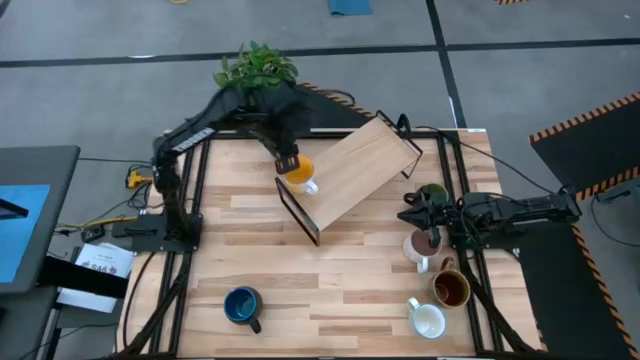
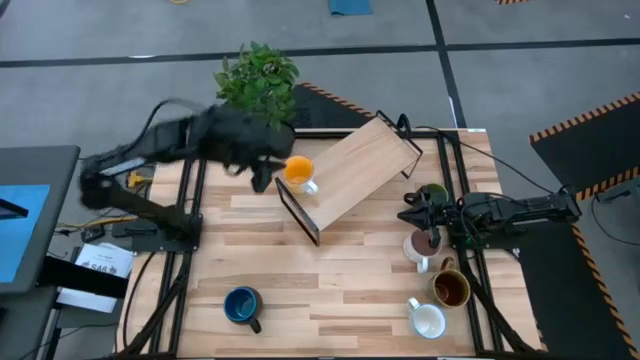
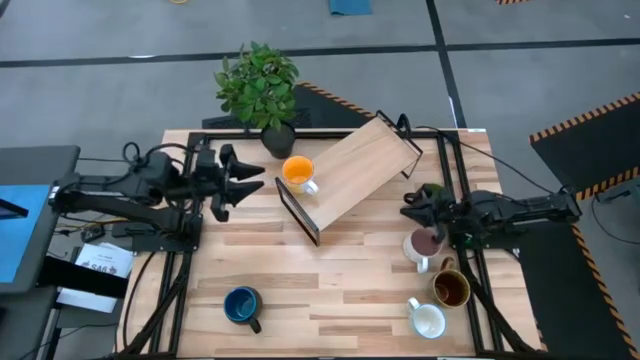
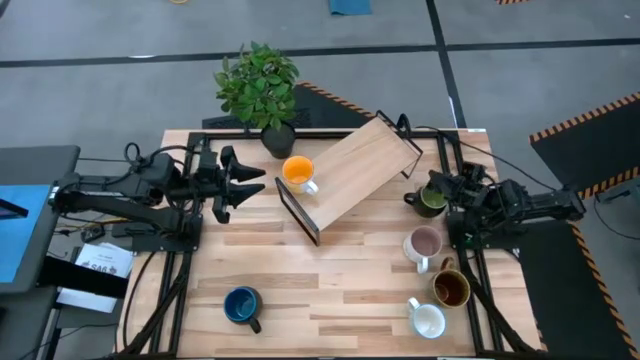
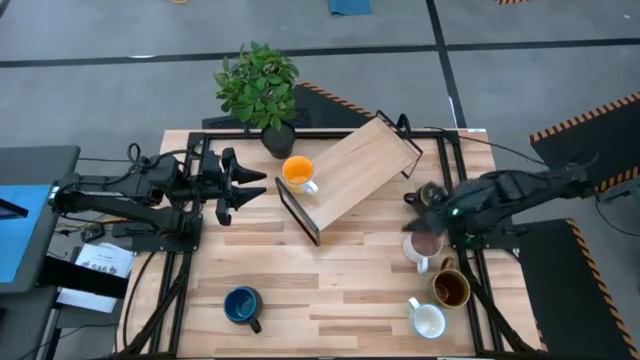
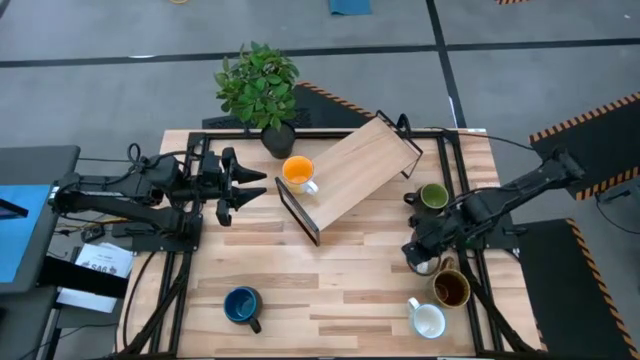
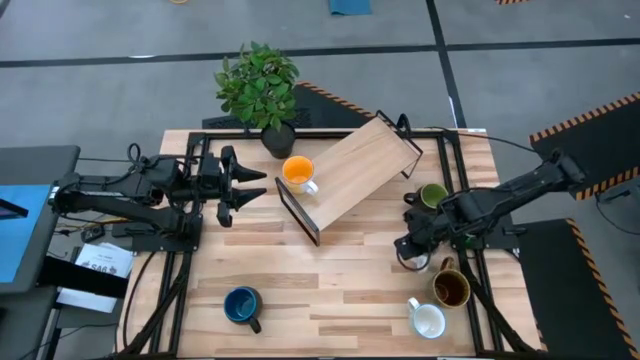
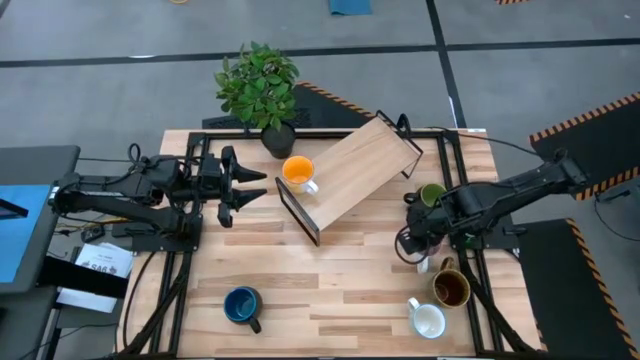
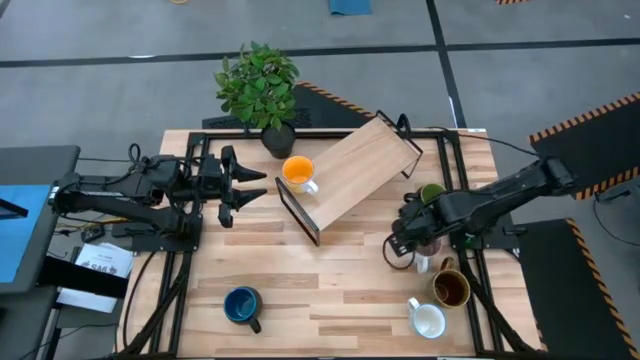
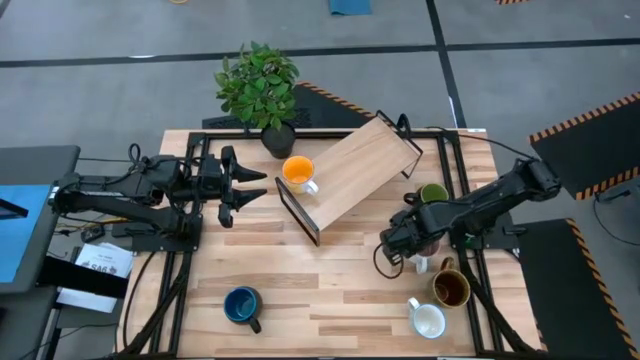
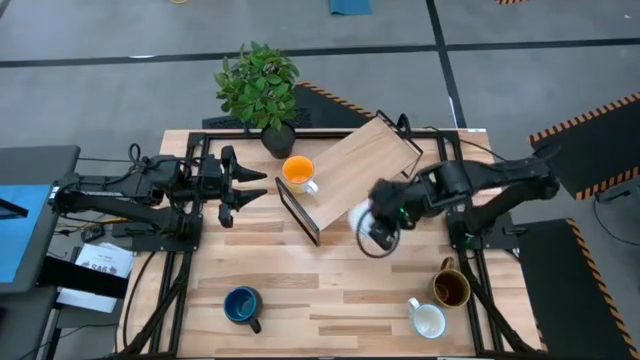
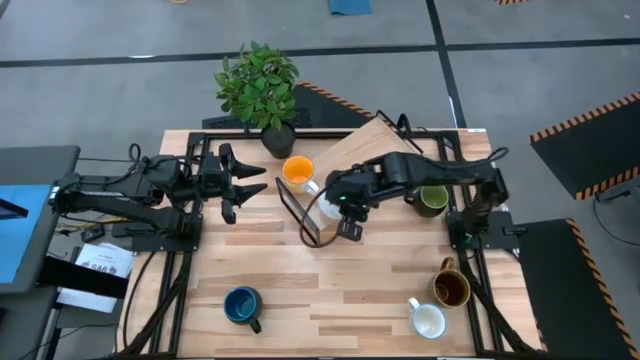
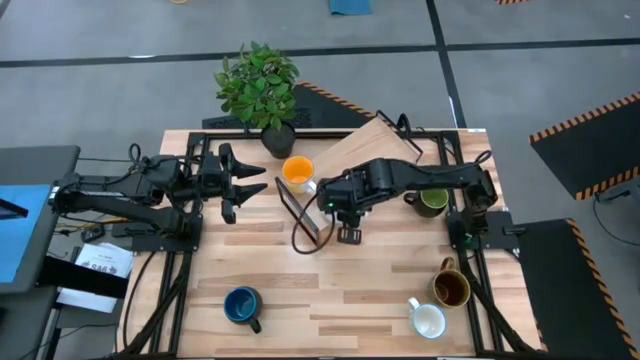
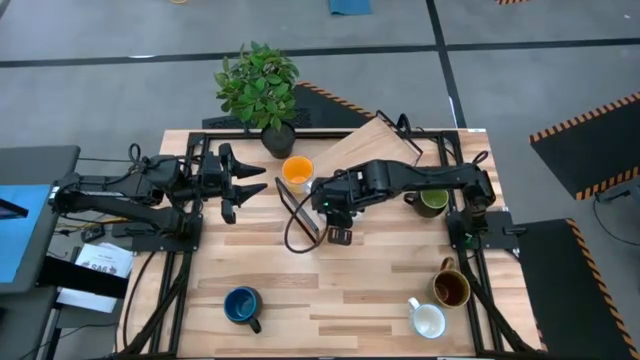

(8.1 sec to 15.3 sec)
Task: Place coffee mugs
Put the pink mug on the shelf

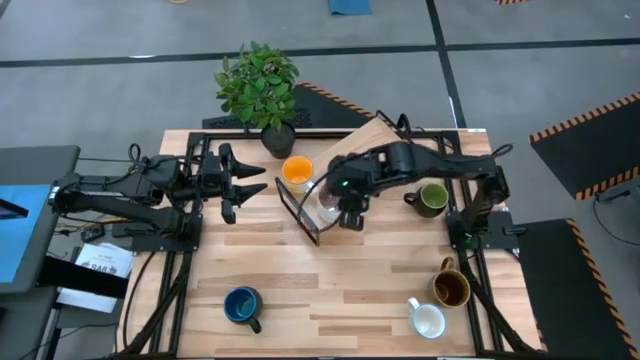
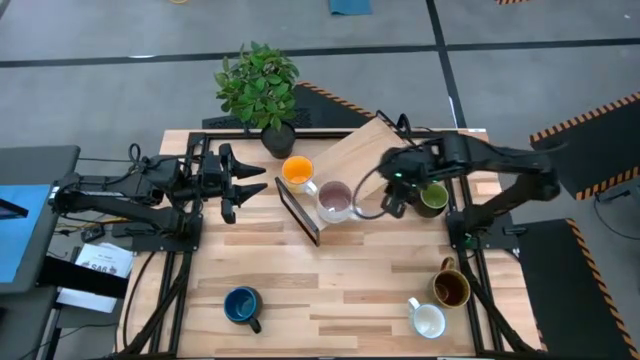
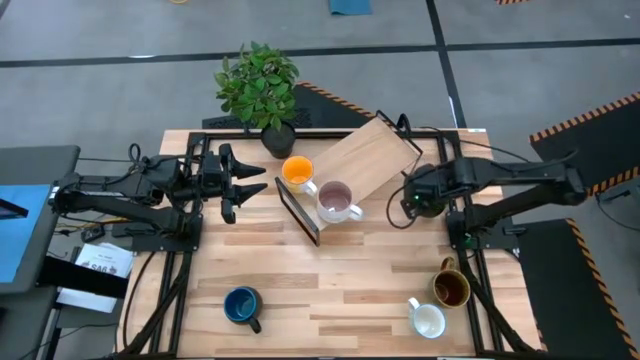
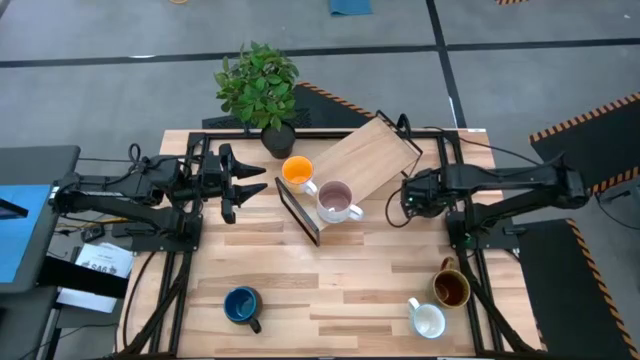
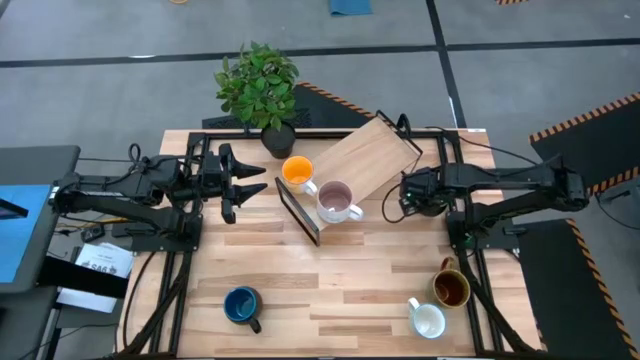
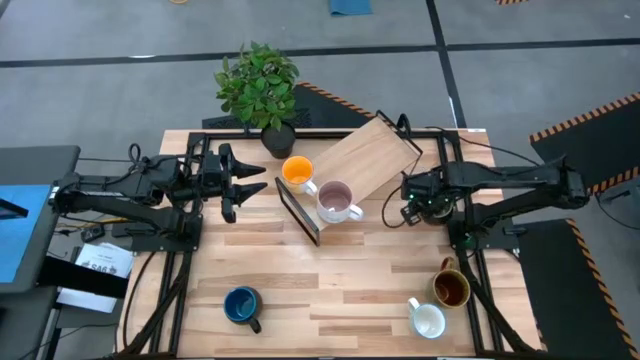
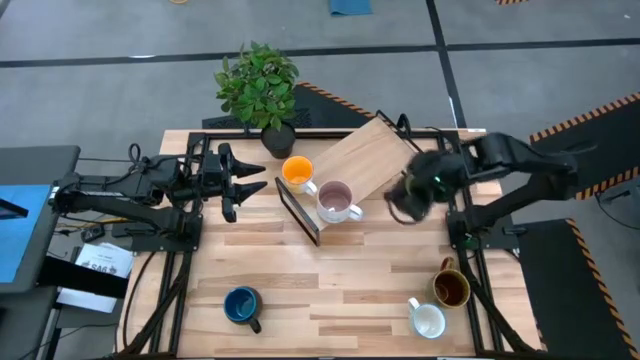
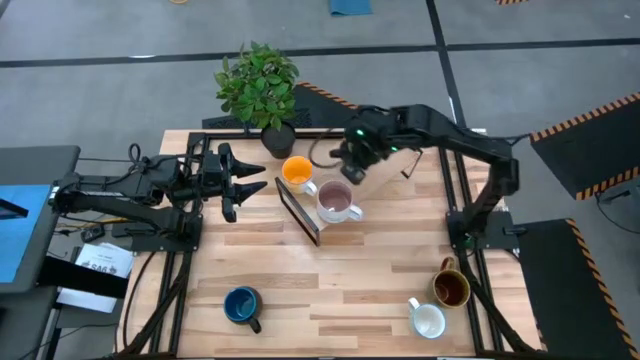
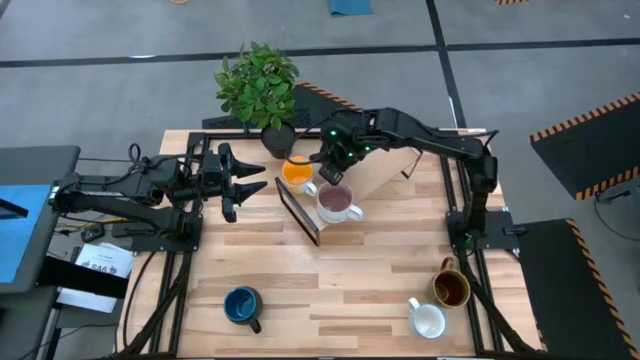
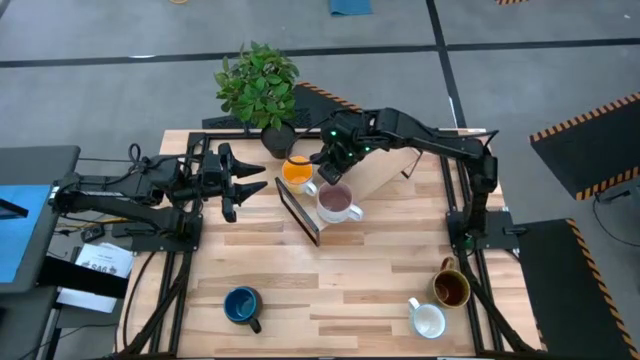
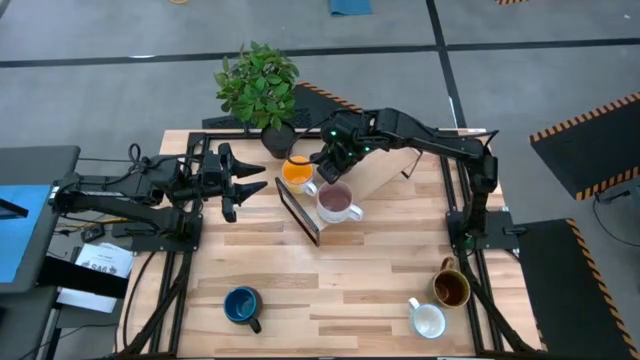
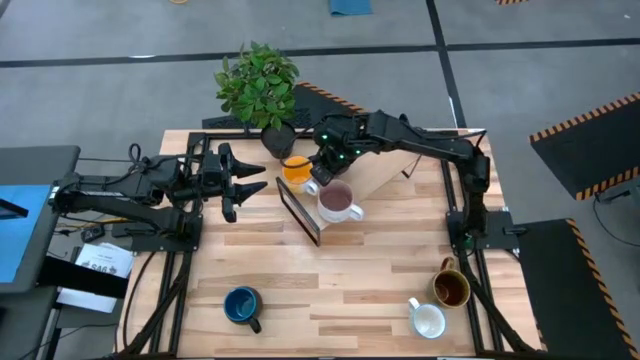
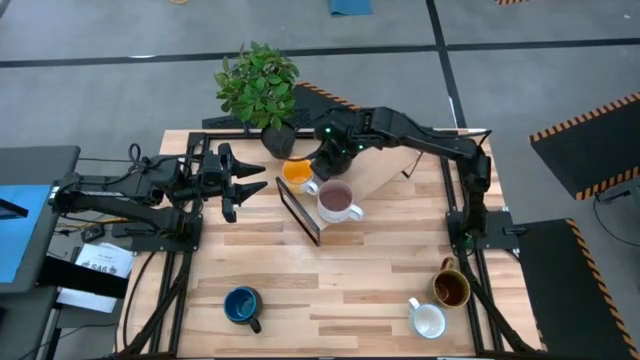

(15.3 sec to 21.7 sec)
Put the green mug on the shelf

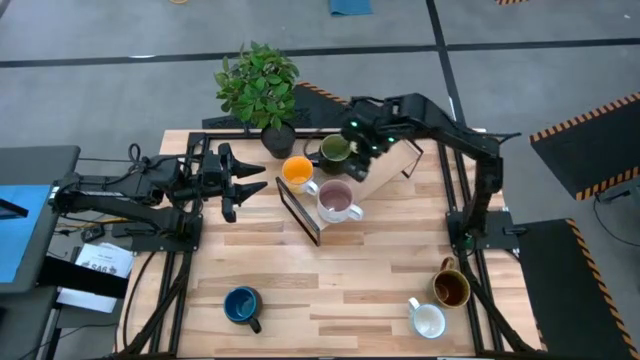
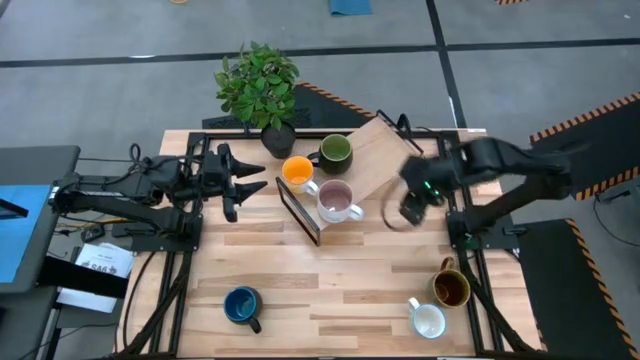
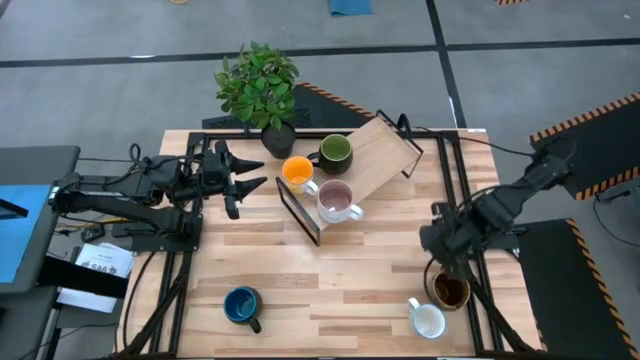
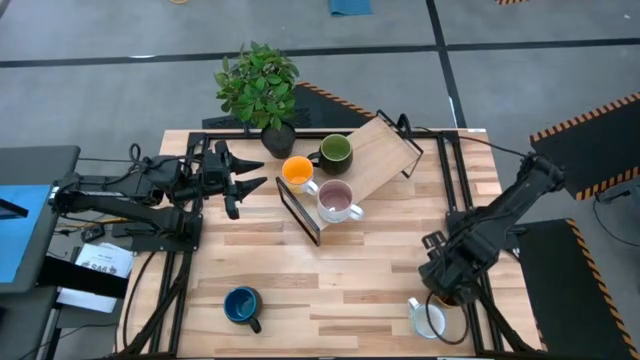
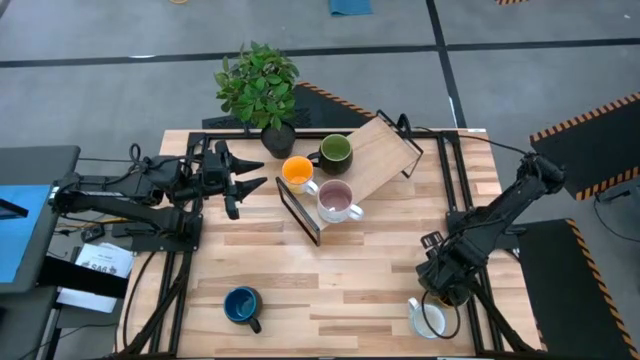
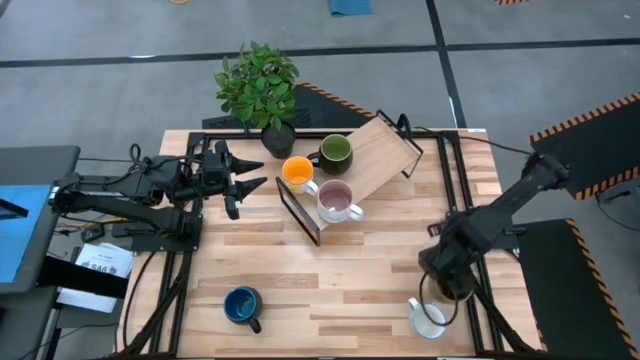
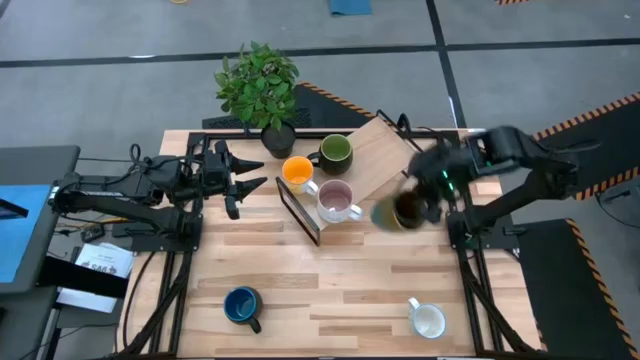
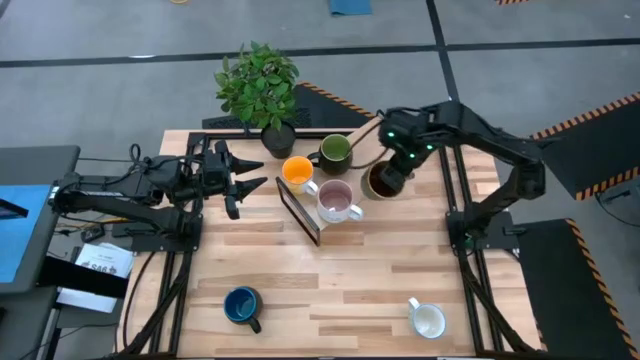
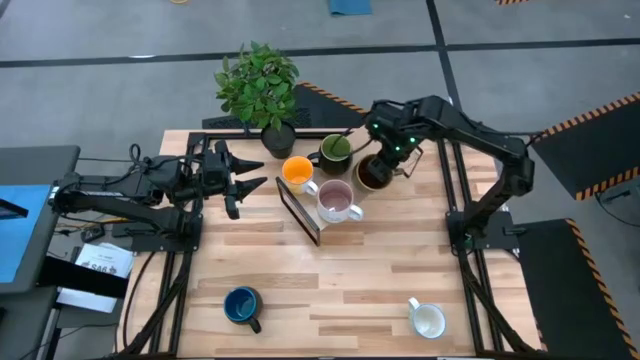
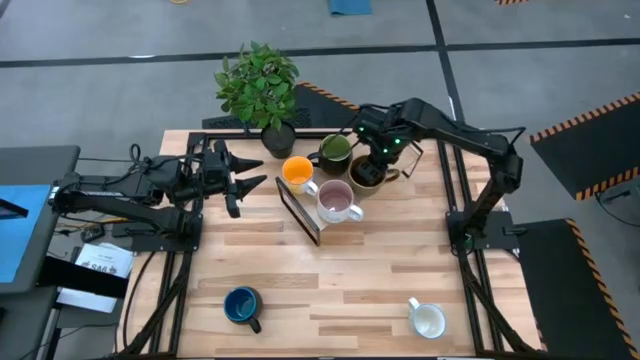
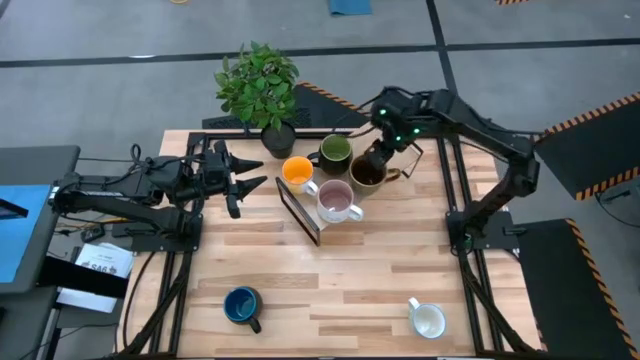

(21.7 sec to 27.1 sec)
Put the brown mug on the shelf

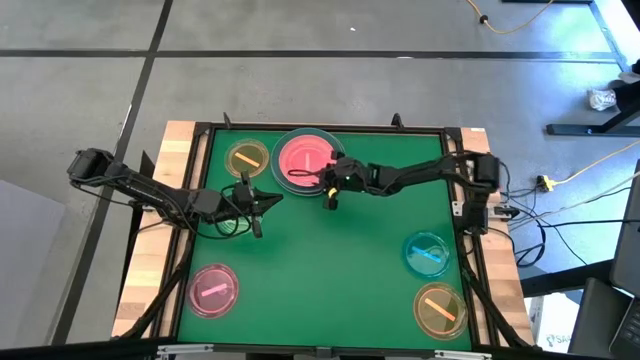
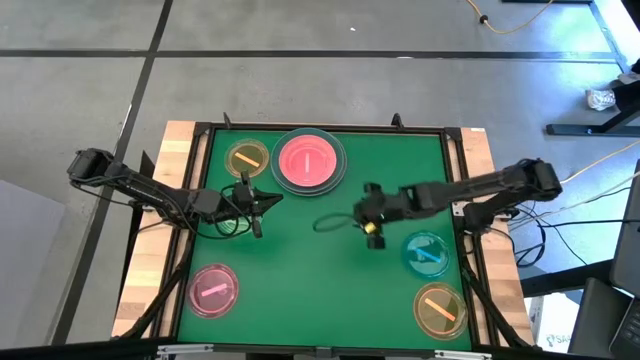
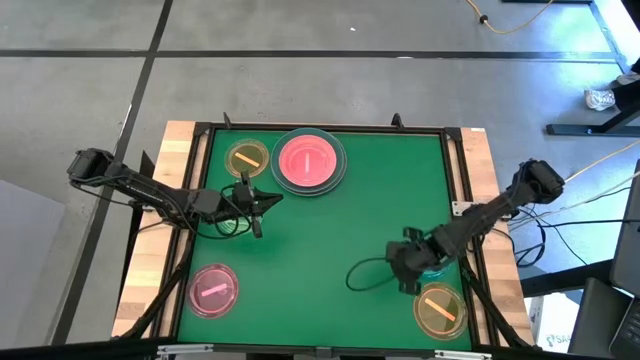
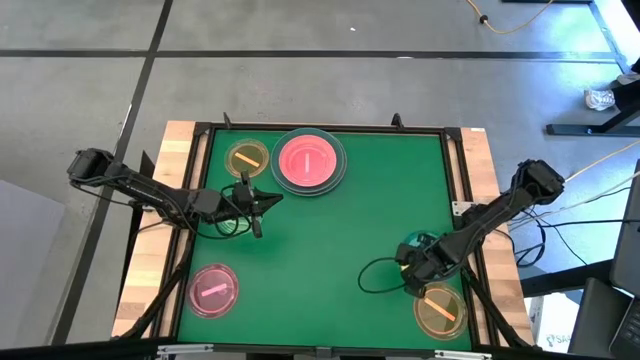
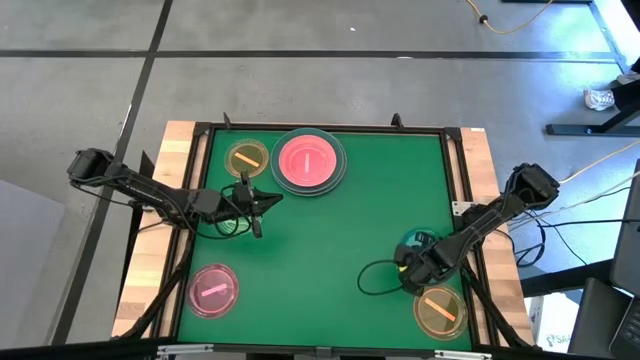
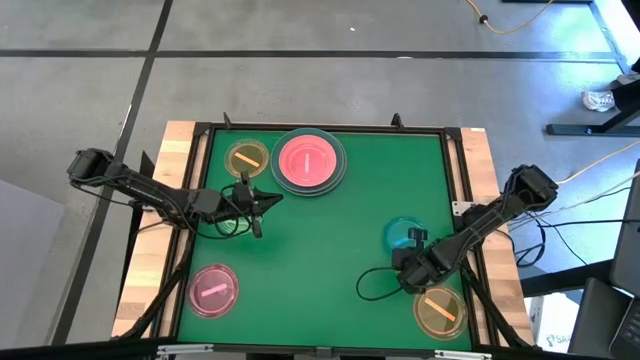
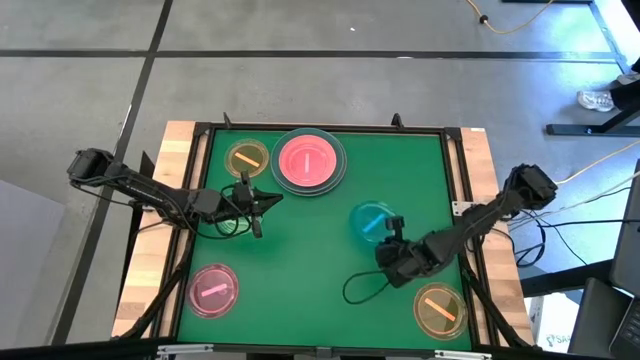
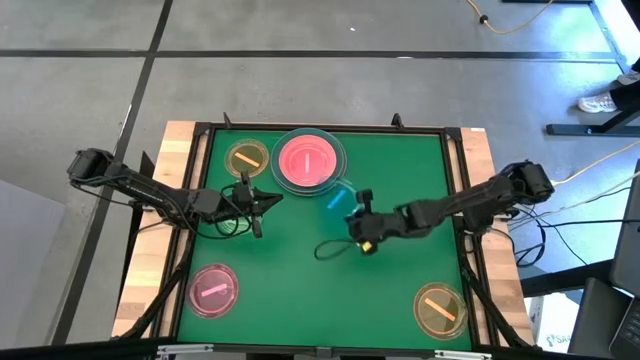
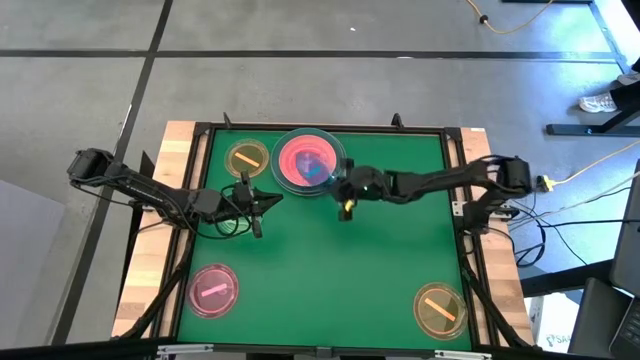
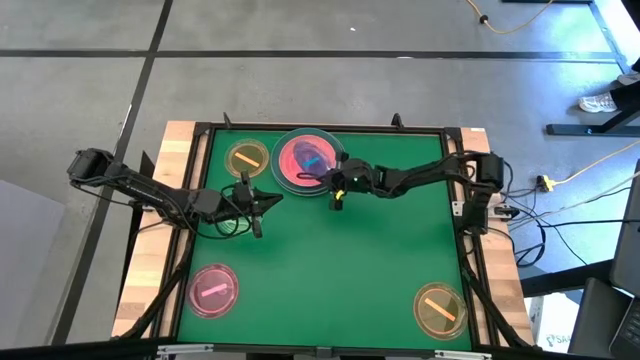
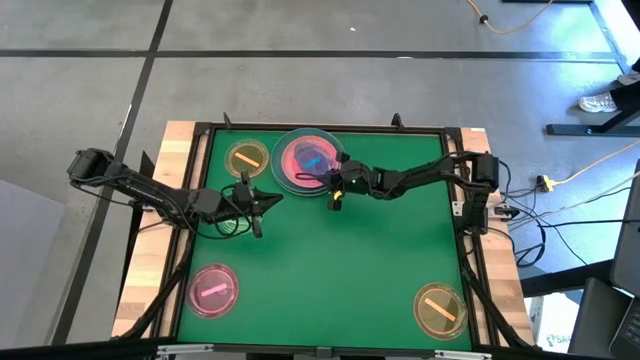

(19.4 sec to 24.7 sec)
Task: Stack plastic plates
Stack the blue plate on top of the pink plate
